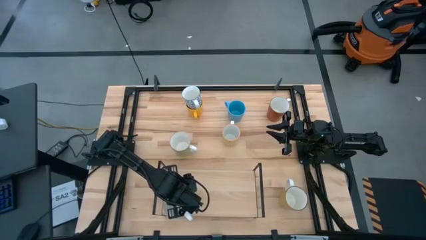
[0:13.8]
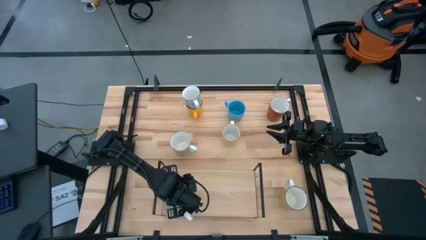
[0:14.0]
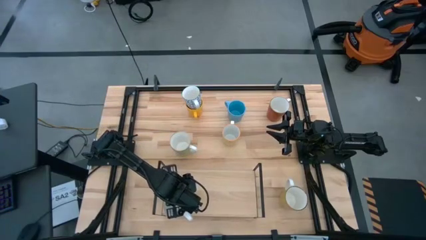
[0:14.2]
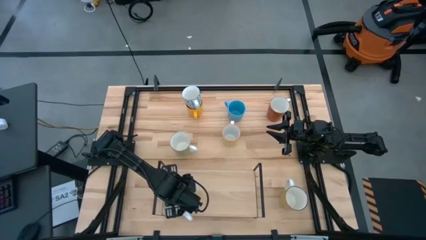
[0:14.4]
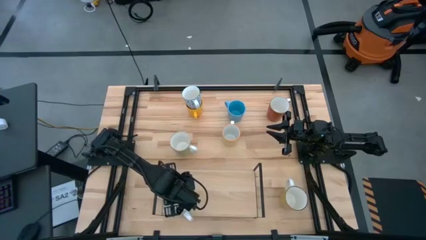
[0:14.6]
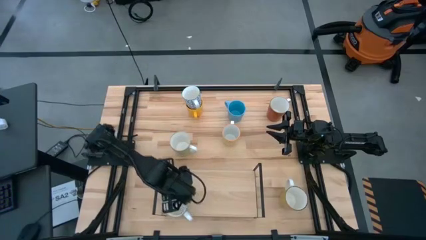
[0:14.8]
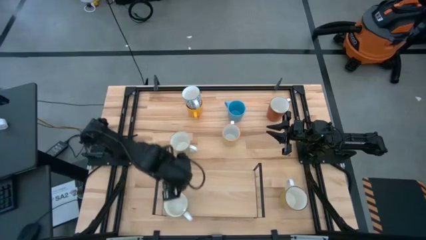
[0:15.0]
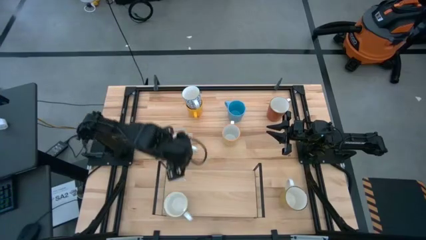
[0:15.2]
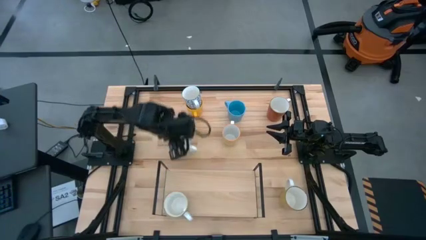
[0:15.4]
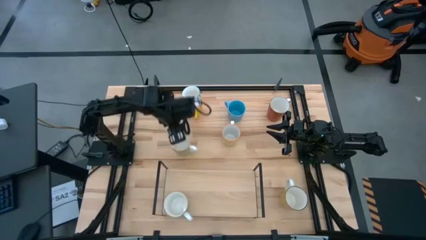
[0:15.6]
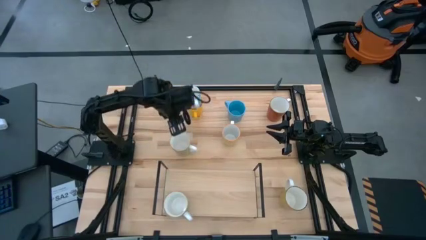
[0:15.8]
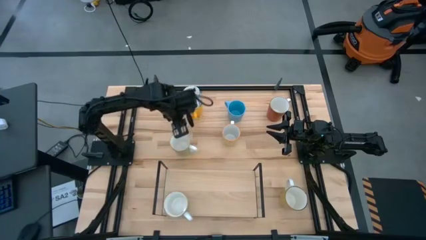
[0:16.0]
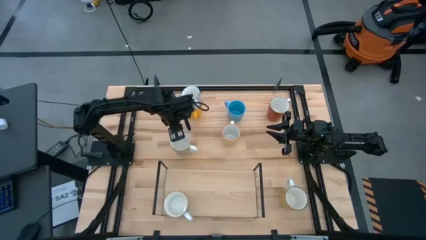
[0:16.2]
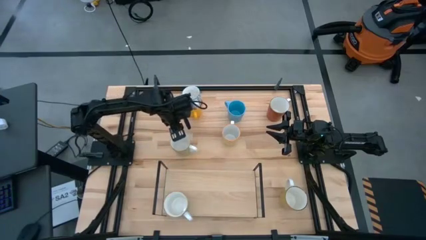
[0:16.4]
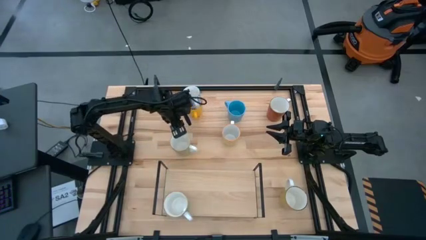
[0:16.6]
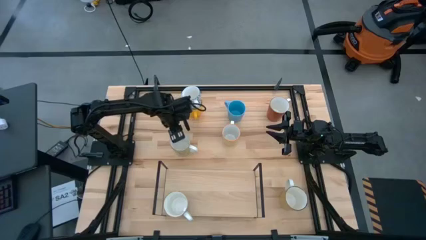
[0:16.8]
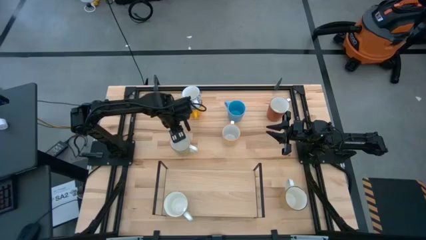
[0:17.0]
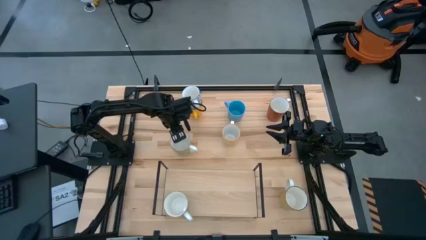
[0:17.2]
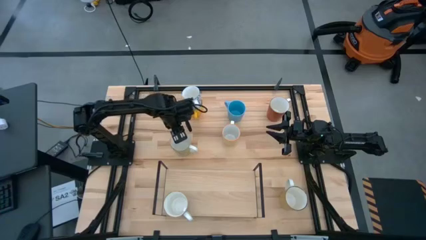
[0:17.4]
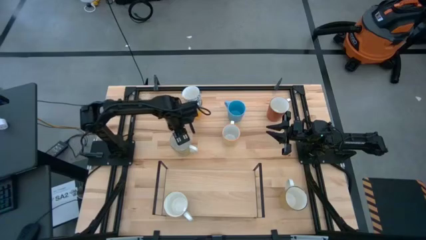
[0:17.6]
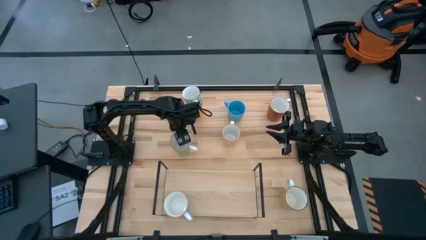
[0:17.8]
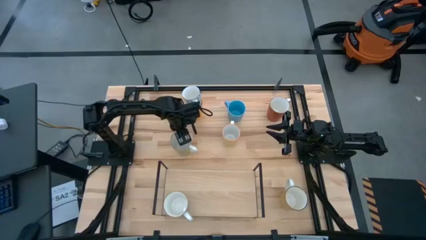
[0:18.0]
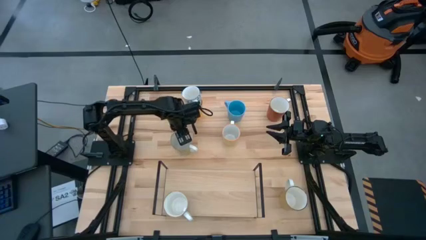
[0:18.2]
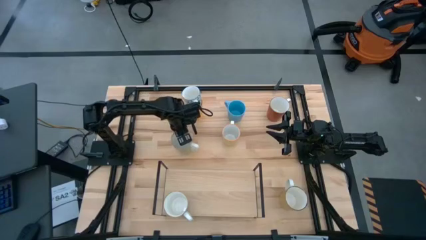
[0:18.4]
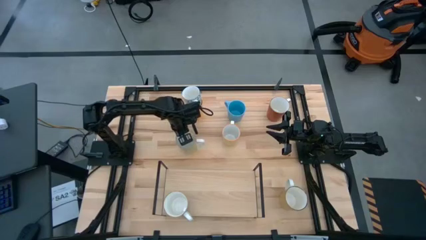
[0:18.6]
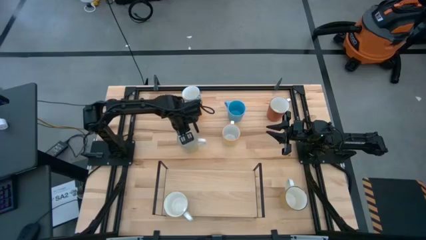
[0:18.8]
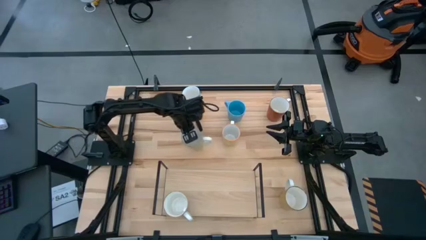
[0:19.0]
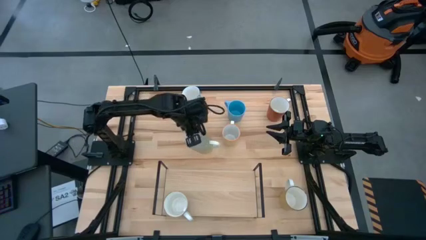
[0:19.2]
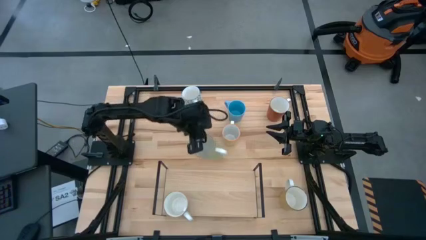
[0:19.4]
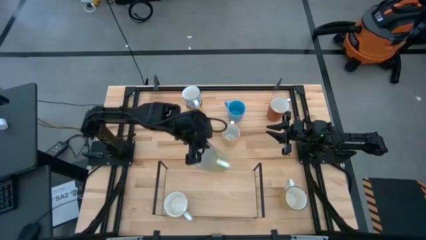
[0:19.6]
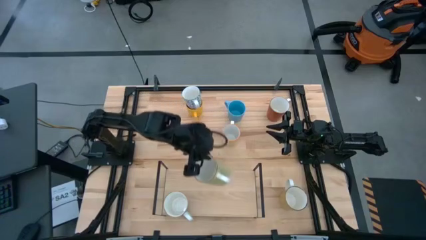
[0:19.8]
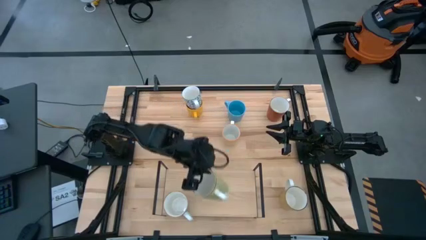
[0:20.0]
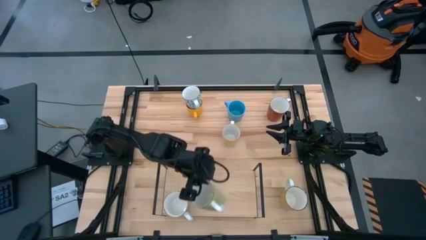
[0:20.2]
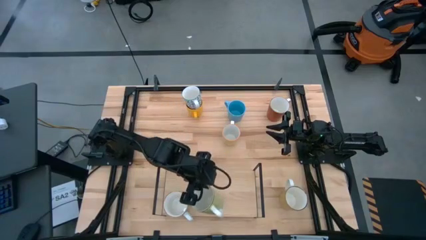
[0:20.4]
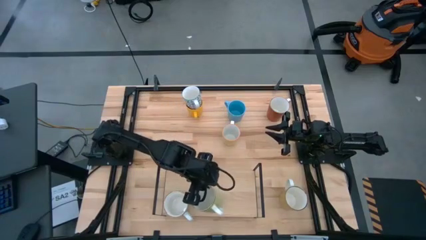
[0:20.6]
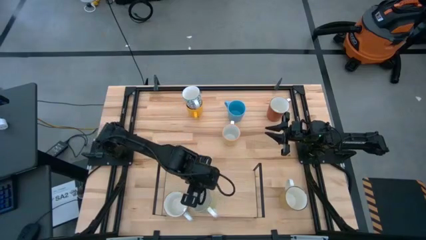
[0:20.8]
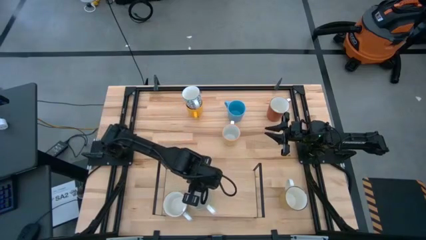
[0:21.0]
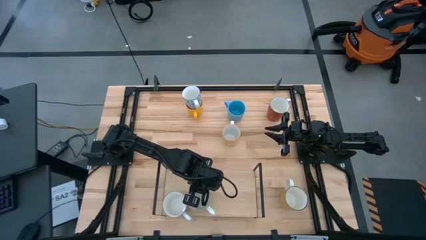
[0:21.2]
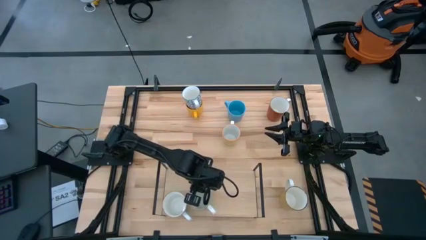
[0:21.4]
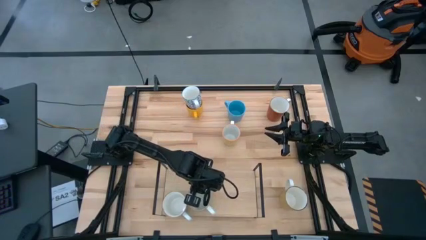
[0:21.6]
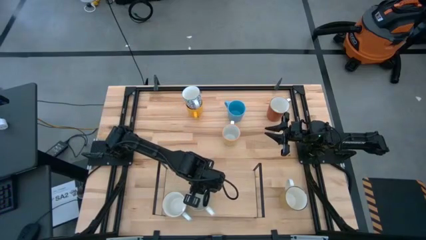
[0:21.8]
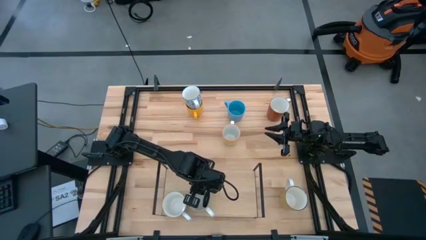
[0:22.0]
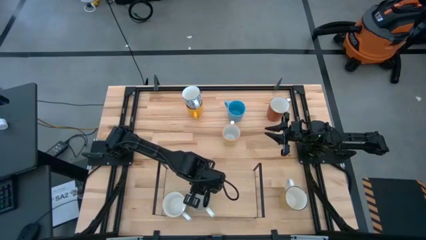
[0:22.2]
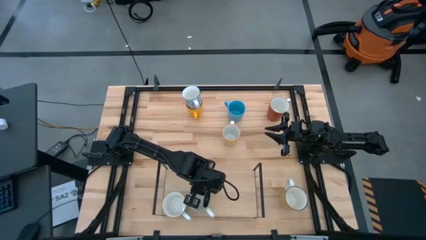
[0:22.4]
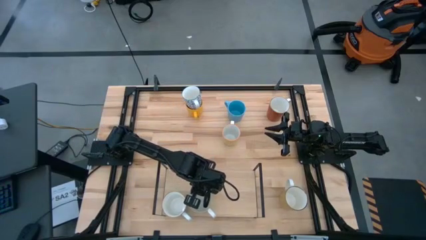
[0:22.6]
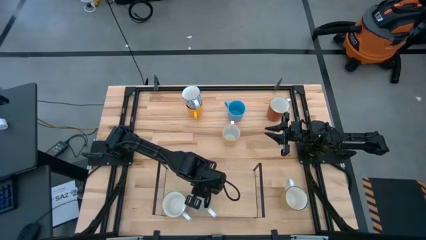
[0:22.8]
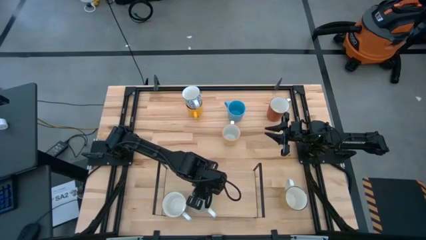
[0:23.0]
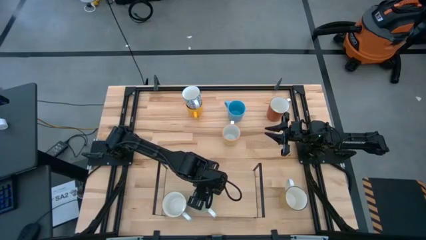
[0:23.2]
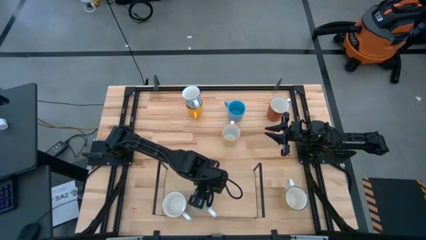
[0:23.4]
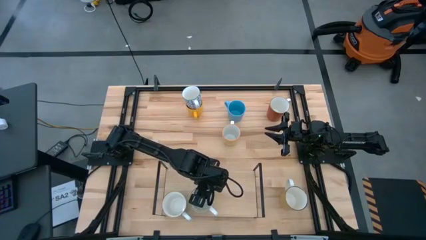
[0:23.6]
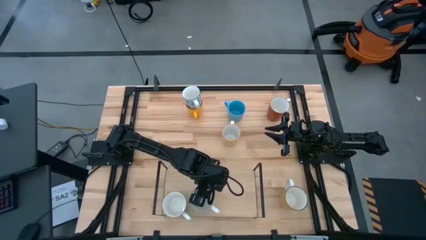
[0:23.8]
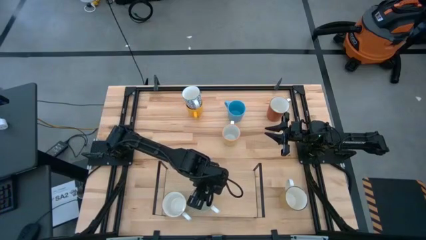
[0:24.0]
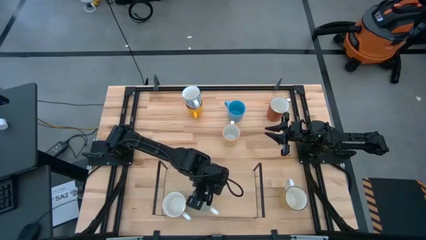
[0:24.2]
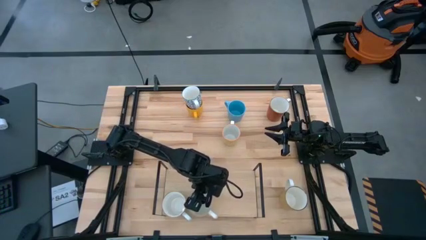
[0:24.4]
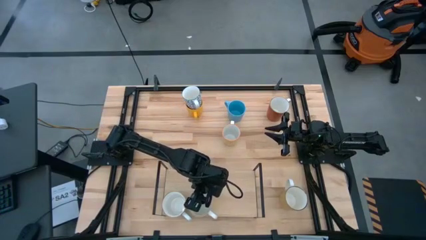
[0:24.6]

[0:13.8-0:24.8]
Task: Place coffee mugs
Put the light green mug on the shelf
